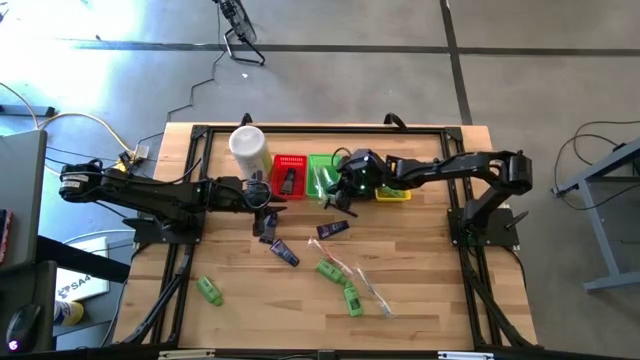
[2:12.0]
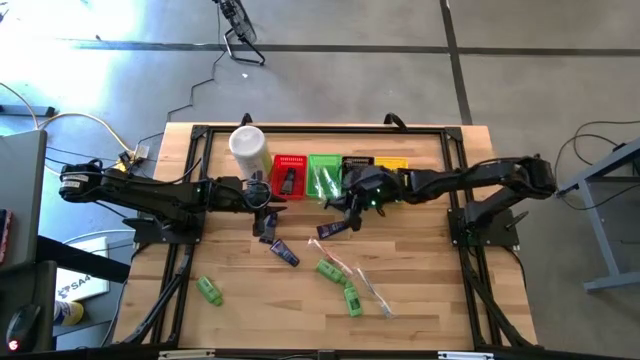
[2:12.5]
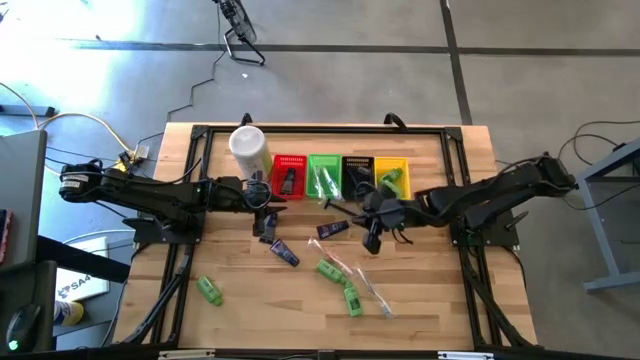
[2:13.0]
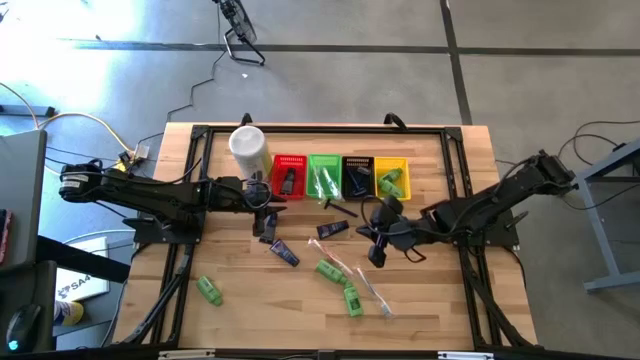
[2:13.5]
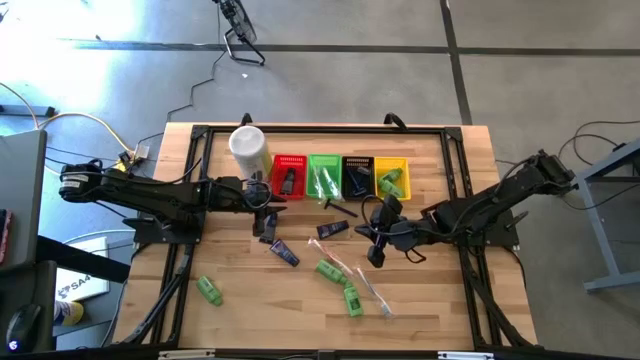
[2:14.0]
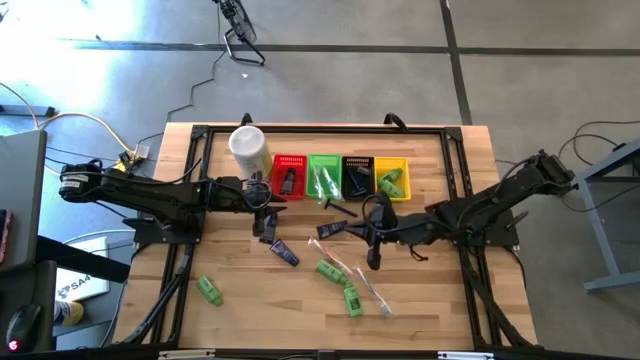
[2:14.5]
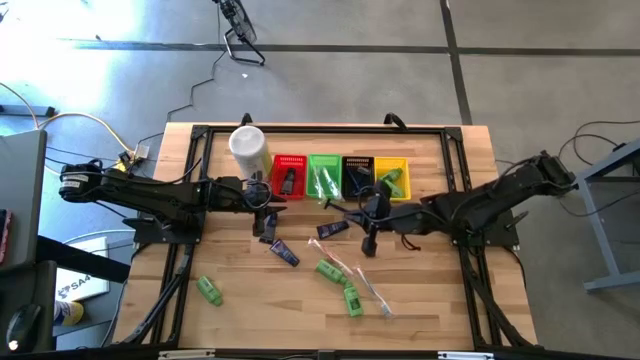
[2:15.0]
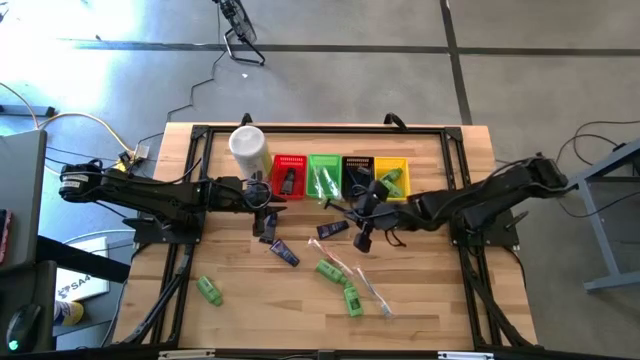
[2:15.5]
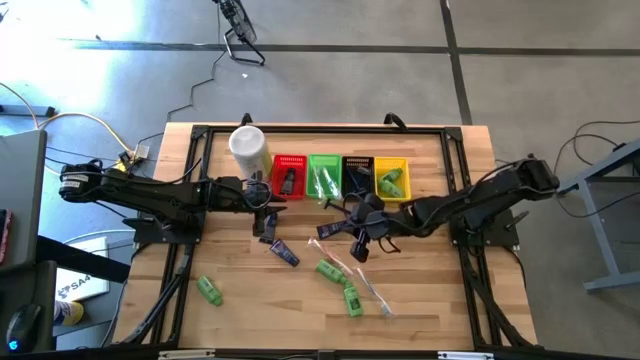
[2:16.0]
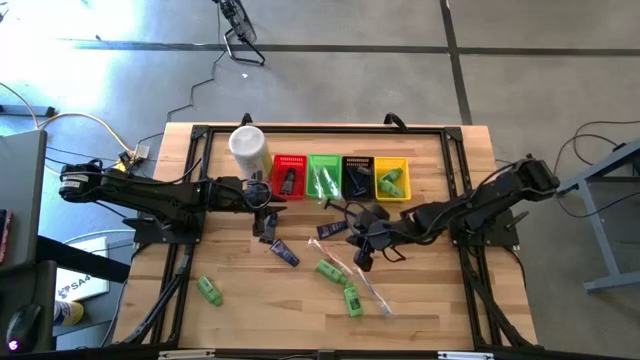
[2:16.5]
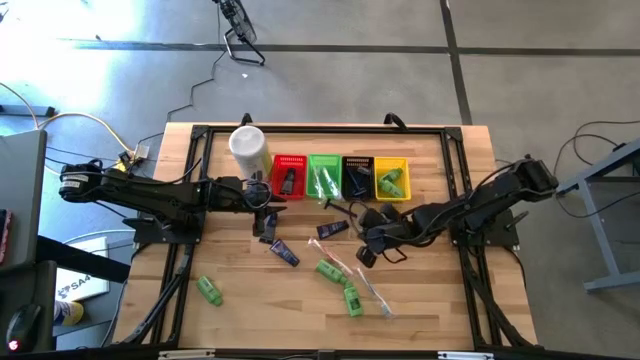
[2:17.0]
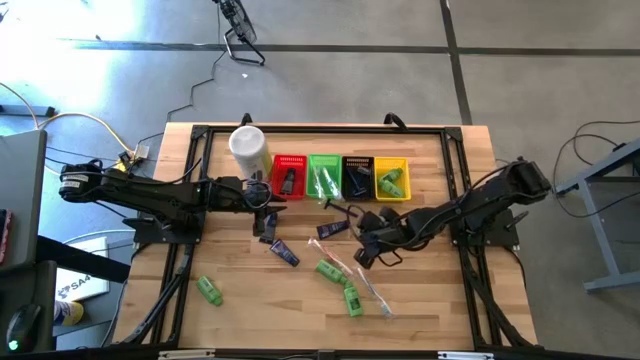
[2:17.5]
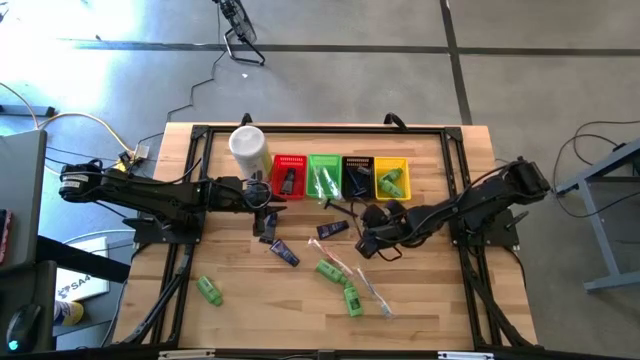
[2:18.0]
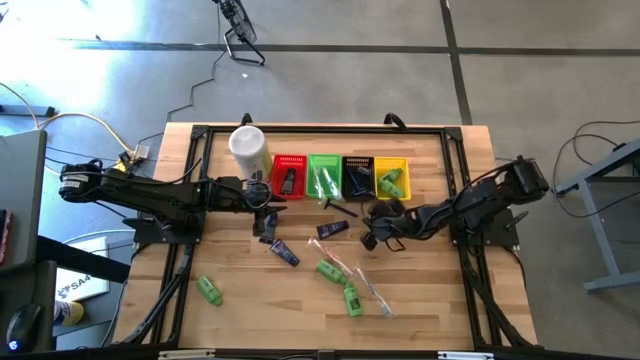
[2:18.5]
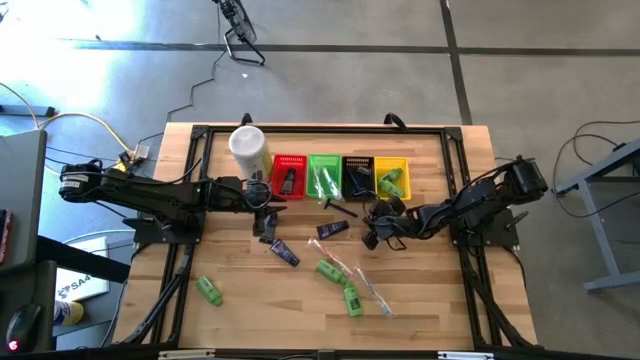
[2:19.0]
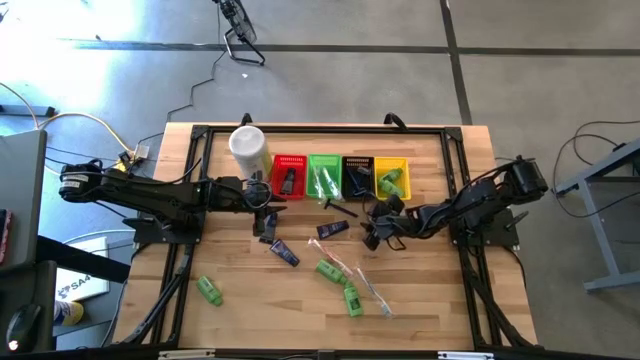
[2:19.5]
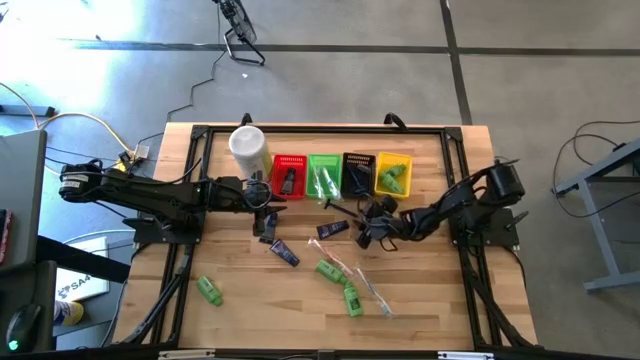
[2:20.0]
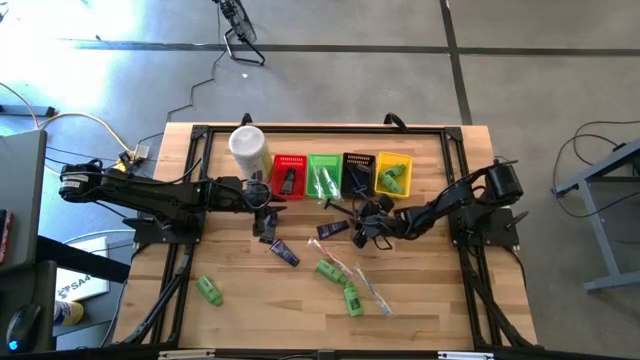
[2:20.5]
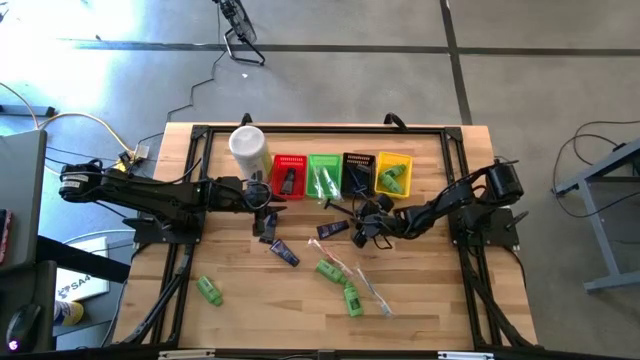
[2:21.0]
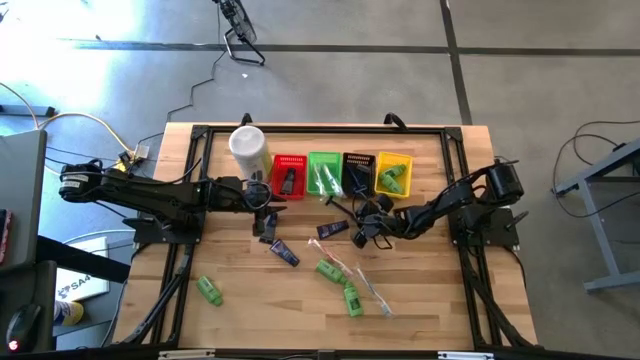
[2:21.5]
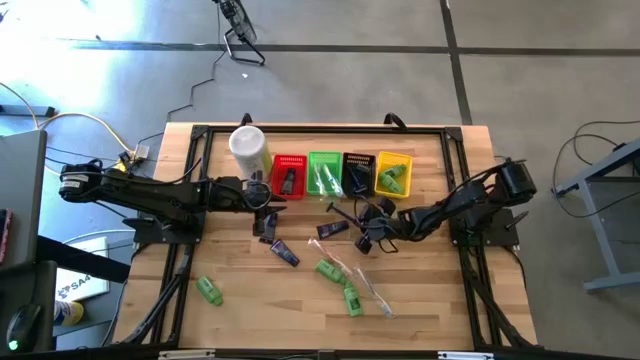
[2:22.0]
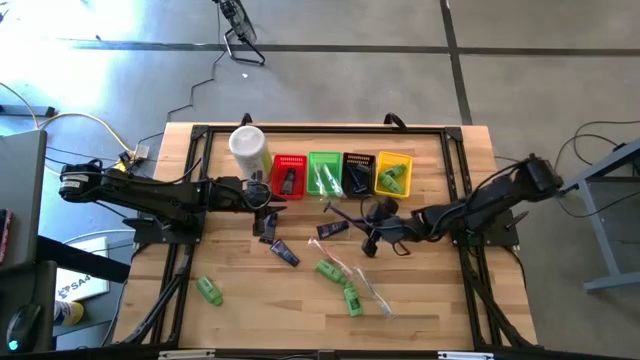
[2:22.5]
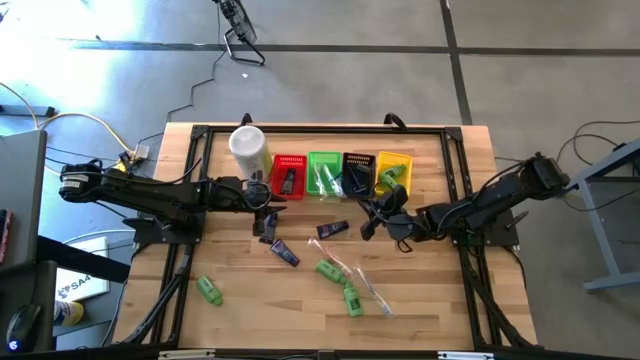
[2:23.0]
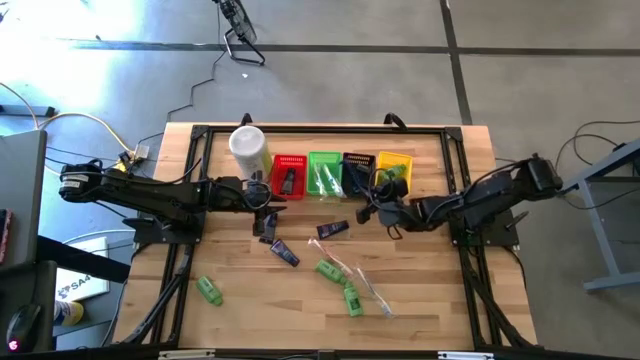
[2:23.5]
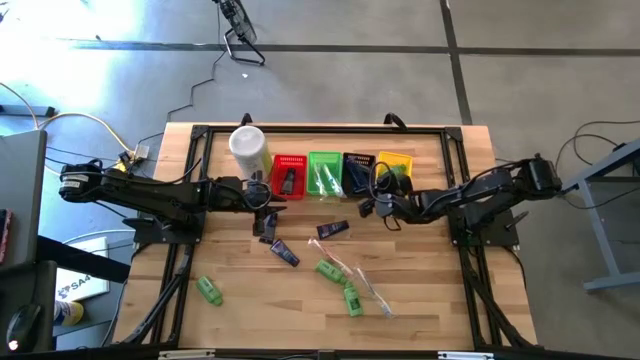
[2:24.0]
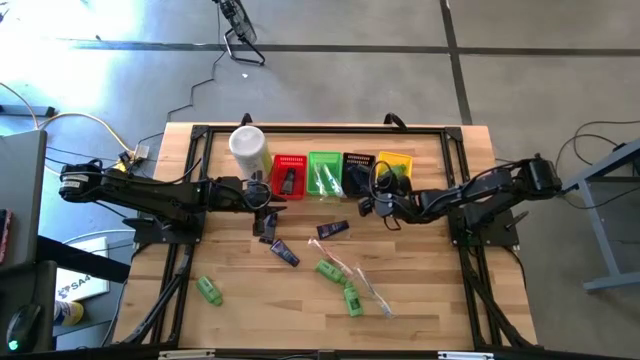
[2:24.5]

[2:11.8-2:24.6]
Task: Pick & Place Travel size toiletries
Put the blue razor into the black bin

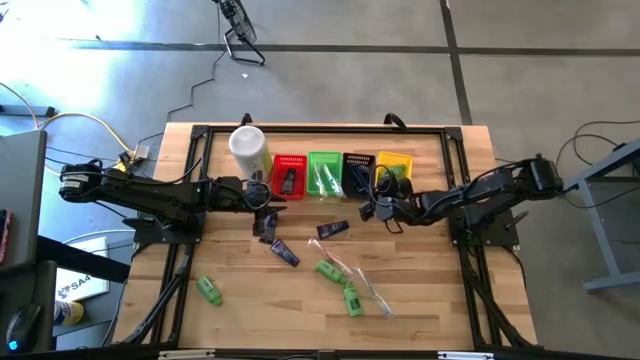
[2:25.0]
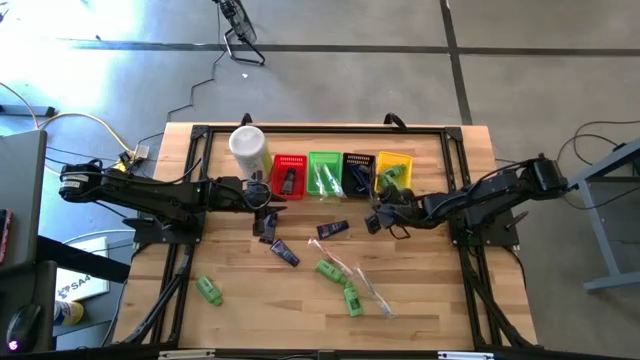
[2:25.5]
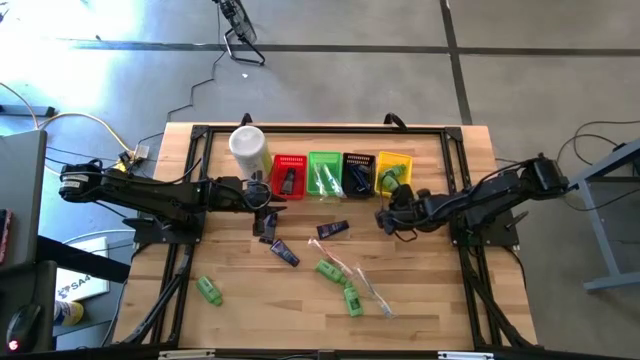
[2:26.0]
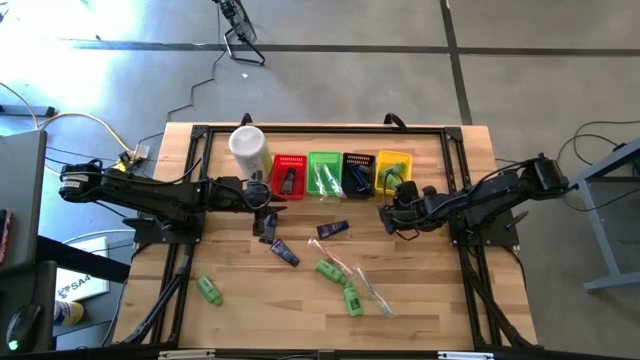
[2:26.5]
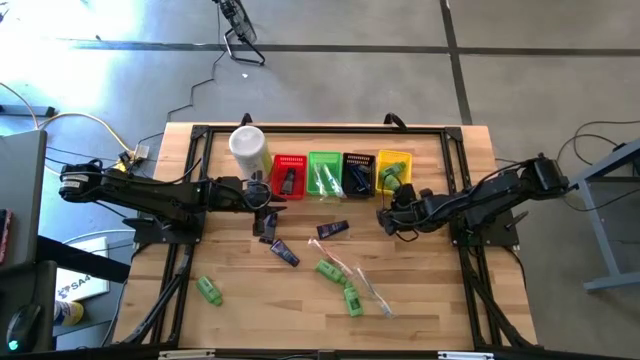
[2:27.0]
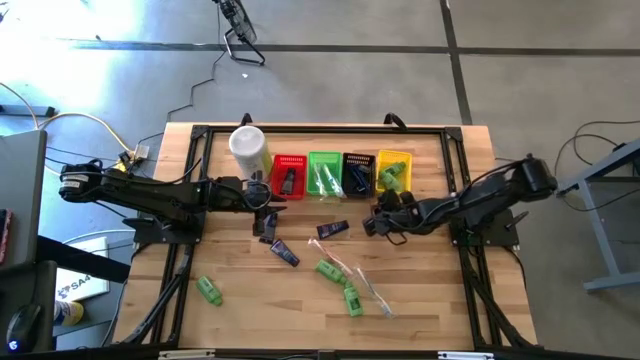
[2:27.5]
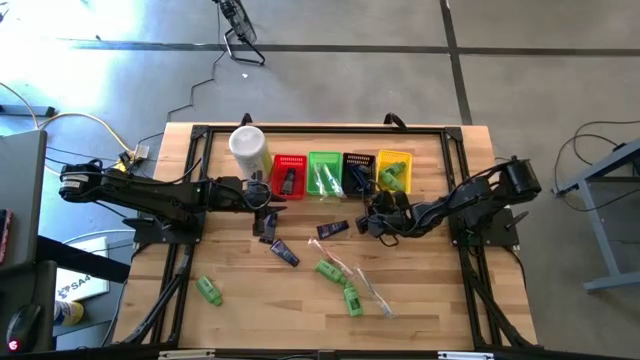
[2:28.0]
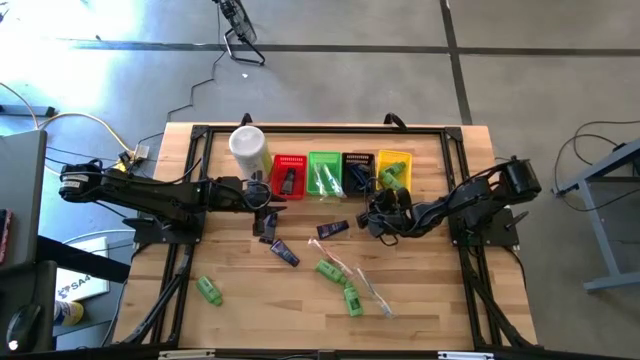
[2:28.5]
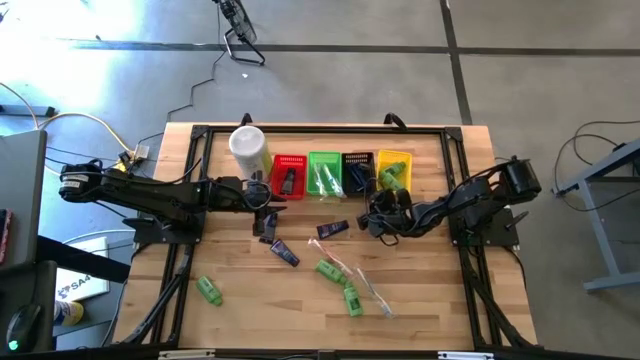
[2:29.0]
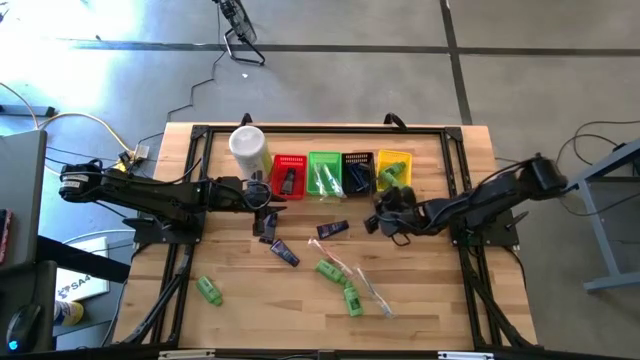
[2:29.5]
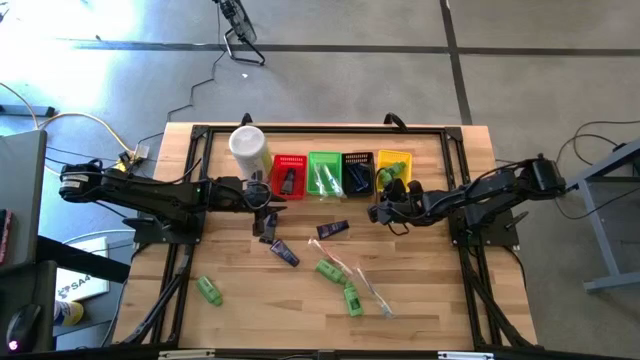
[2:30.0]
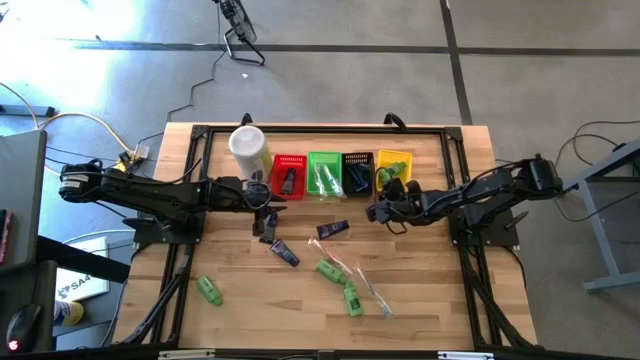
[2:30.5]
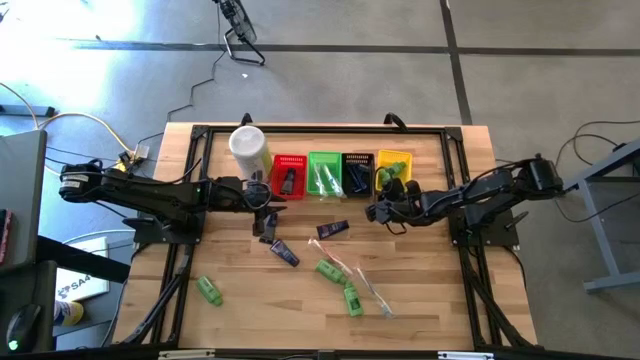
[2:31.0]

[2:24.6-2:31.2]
Adjust the bins

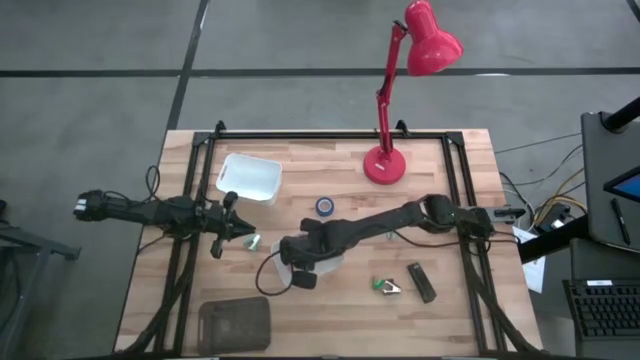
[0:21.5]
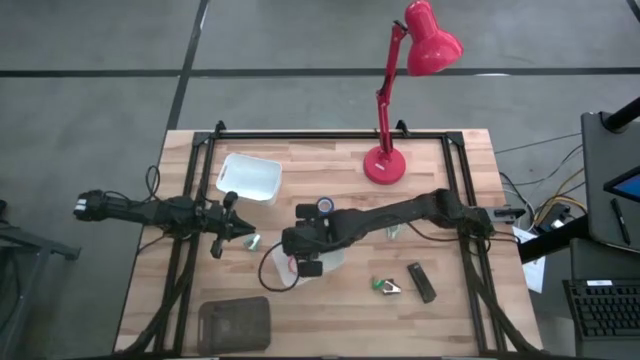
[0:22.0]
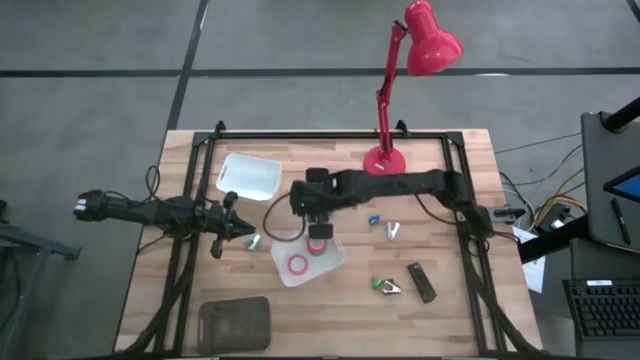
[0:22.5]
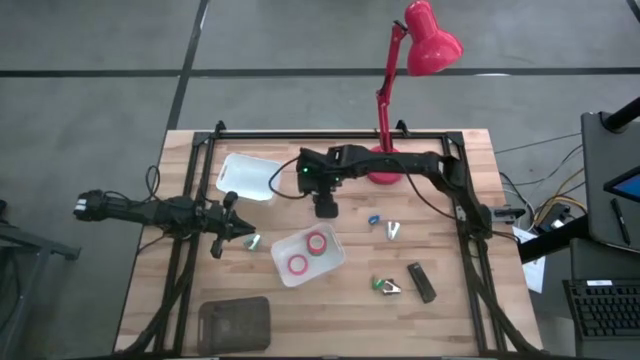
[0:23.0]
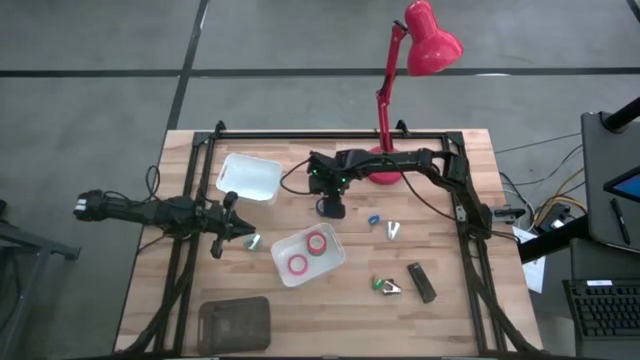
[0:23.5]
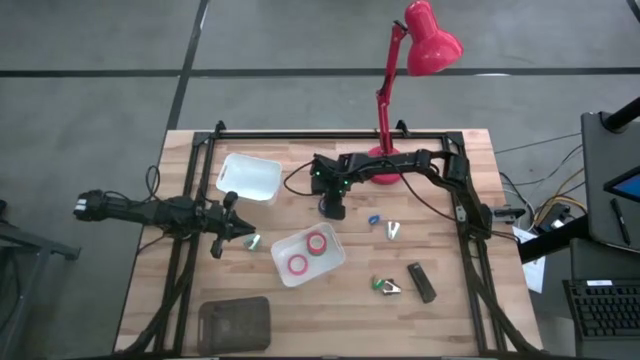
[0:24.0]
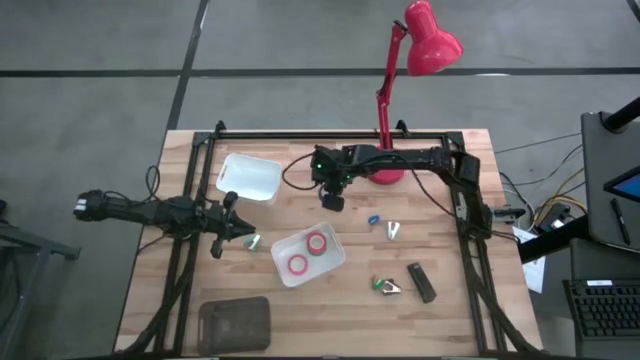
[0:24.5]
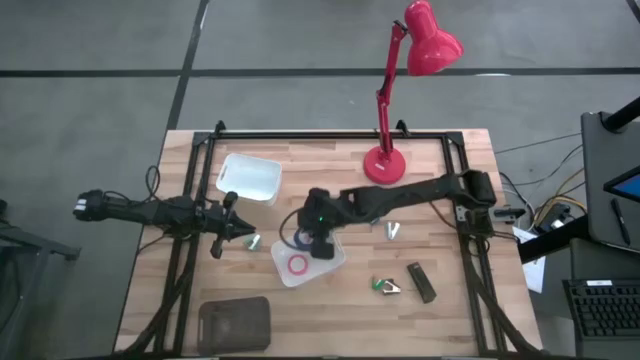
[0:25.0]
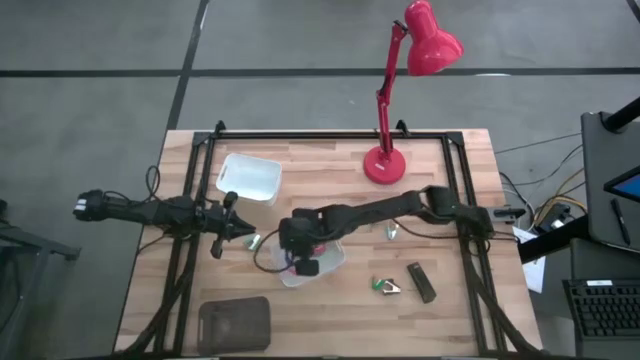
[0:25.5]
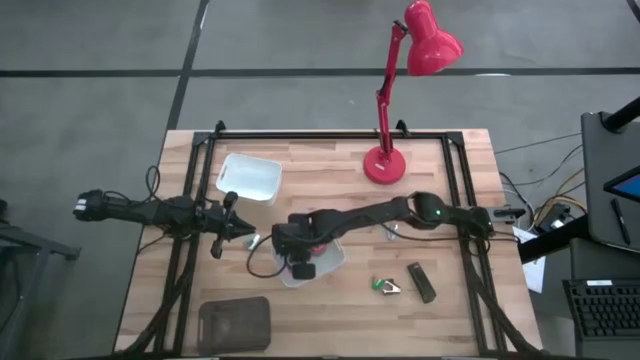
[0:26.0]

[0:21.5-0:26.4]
Task: Pick and place Stapler, Stapler remover, tape
Put the blue tape into the bottom white bin
